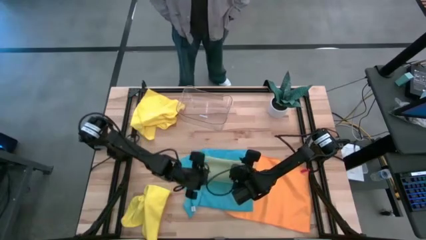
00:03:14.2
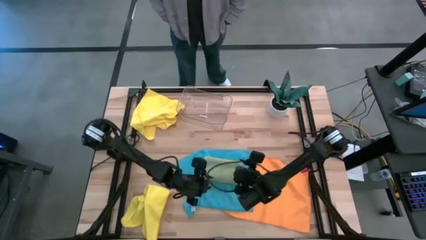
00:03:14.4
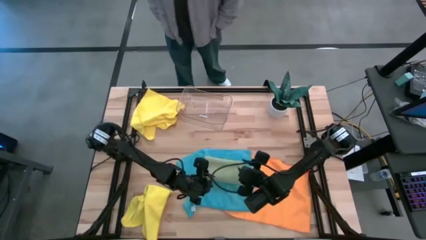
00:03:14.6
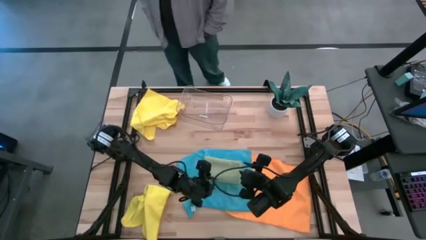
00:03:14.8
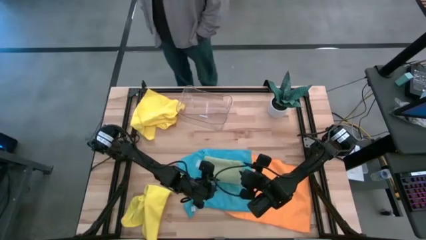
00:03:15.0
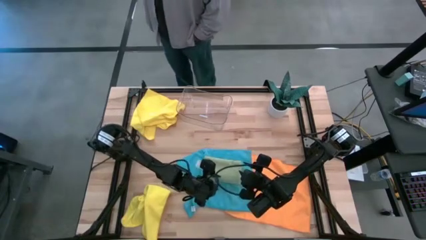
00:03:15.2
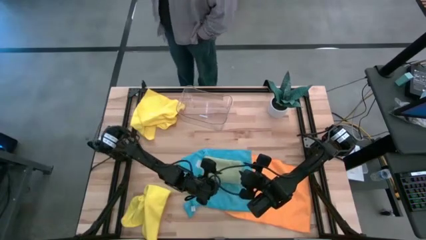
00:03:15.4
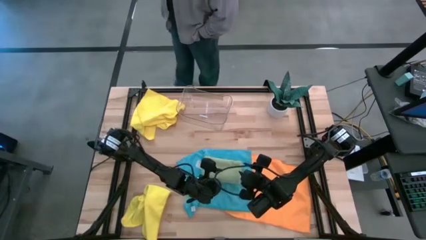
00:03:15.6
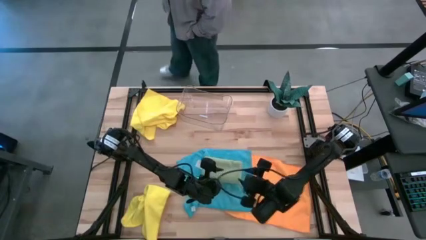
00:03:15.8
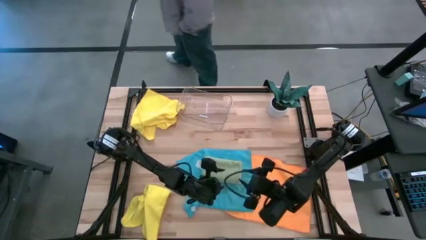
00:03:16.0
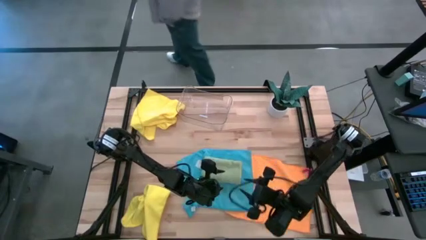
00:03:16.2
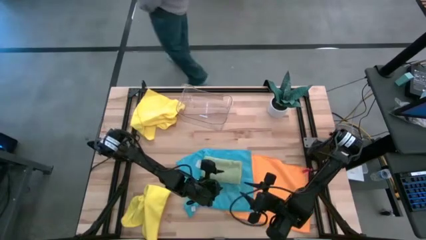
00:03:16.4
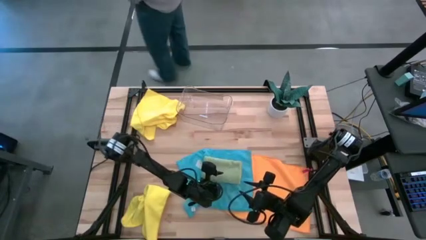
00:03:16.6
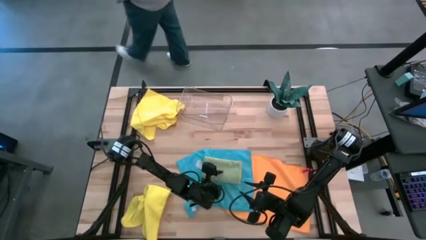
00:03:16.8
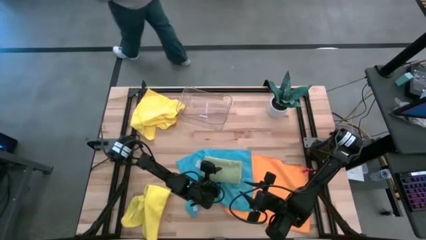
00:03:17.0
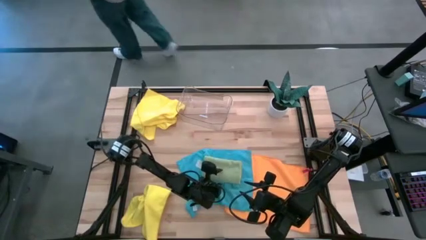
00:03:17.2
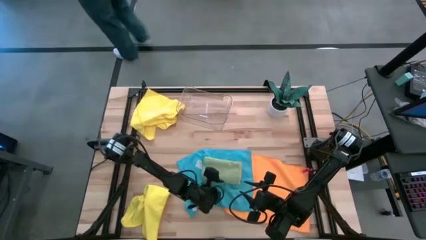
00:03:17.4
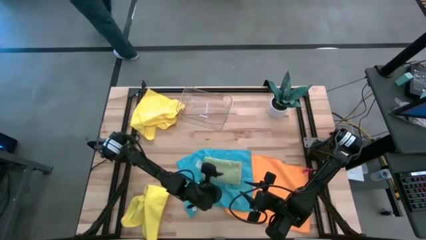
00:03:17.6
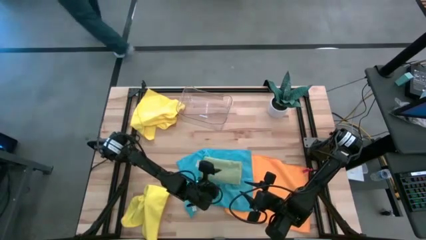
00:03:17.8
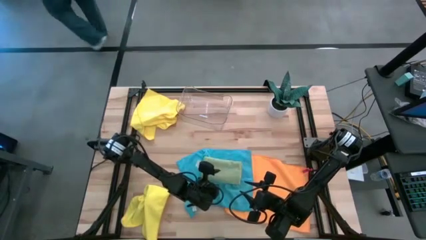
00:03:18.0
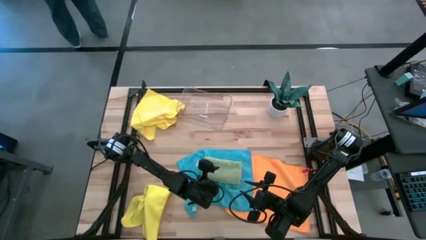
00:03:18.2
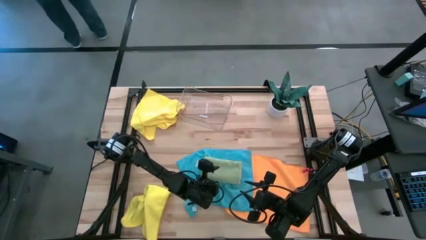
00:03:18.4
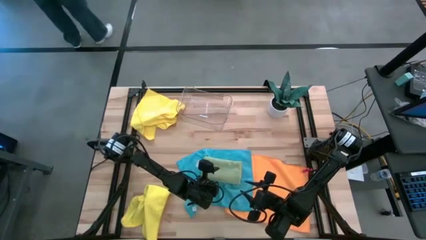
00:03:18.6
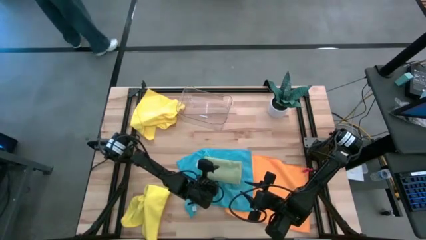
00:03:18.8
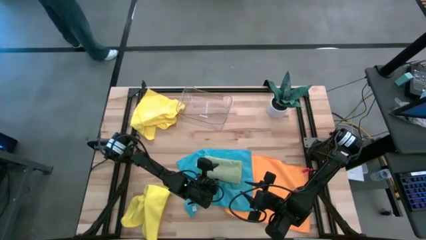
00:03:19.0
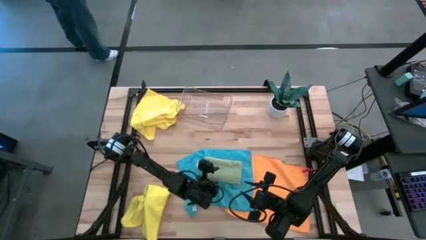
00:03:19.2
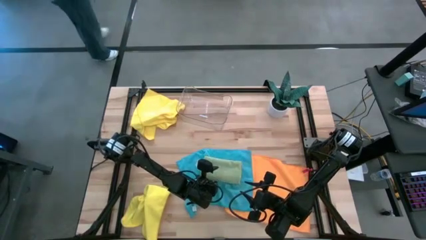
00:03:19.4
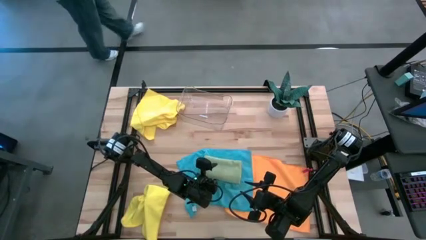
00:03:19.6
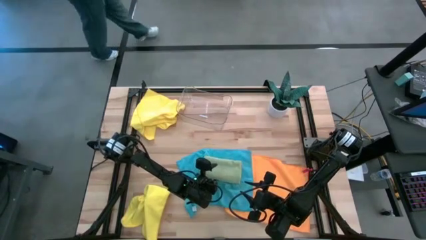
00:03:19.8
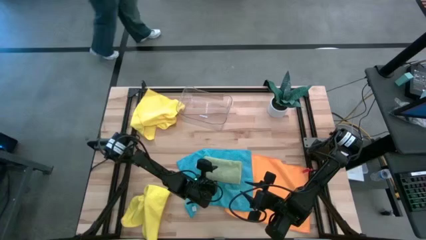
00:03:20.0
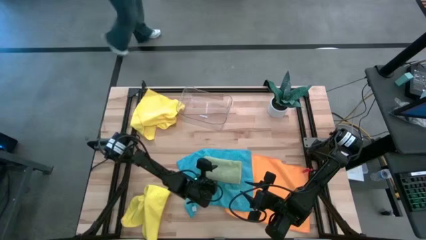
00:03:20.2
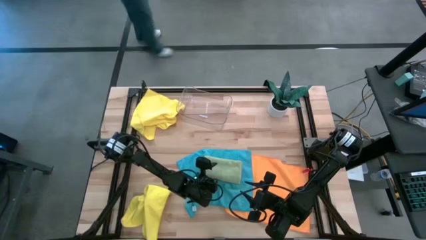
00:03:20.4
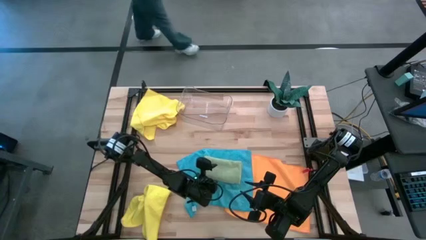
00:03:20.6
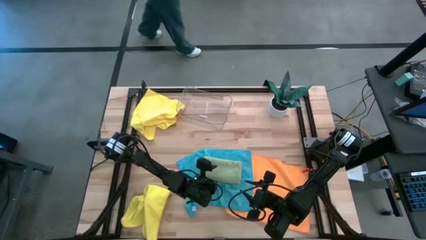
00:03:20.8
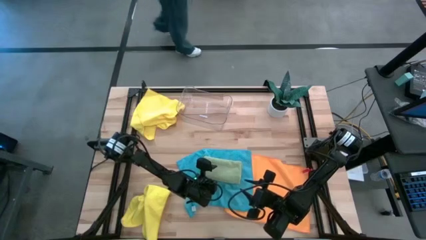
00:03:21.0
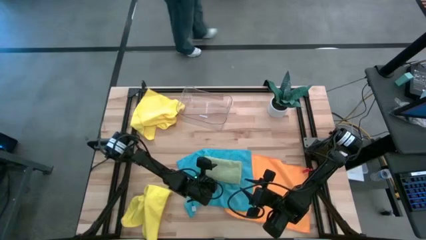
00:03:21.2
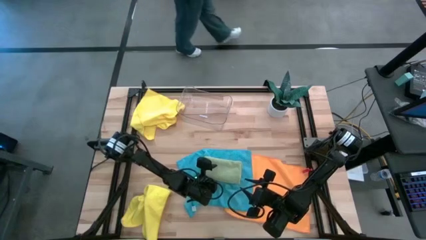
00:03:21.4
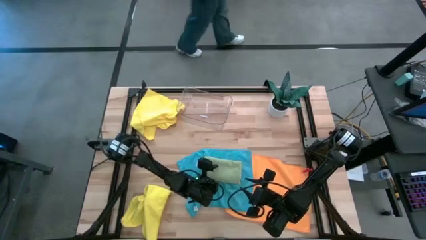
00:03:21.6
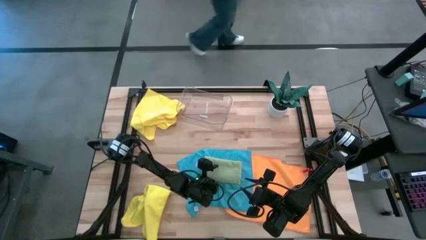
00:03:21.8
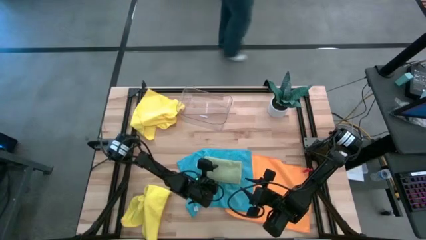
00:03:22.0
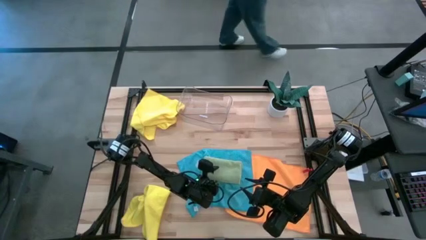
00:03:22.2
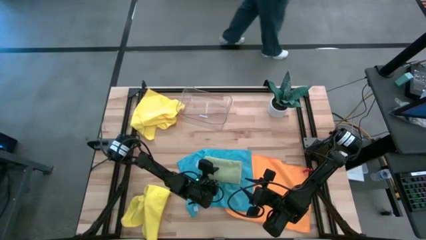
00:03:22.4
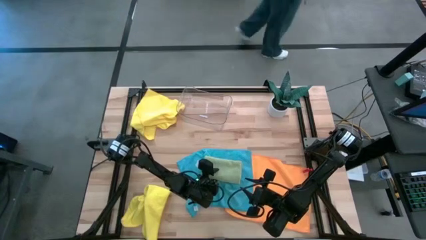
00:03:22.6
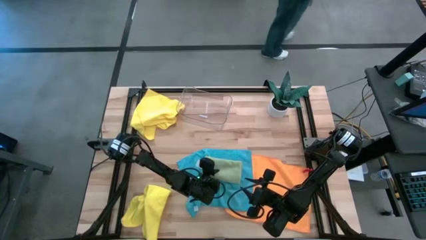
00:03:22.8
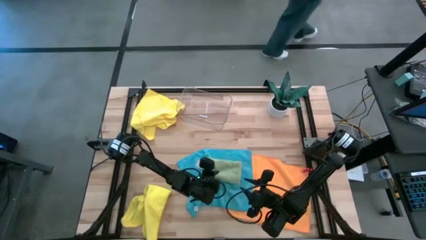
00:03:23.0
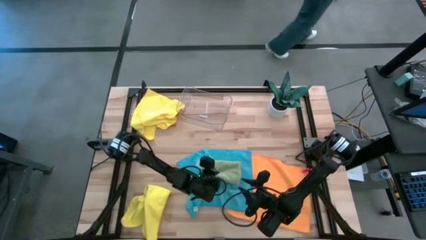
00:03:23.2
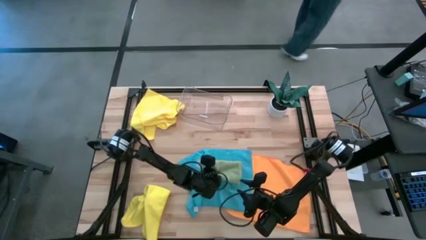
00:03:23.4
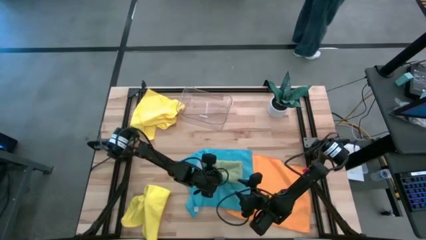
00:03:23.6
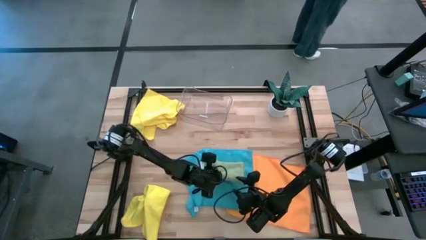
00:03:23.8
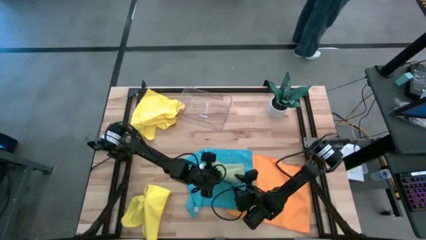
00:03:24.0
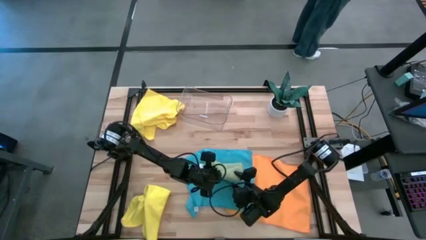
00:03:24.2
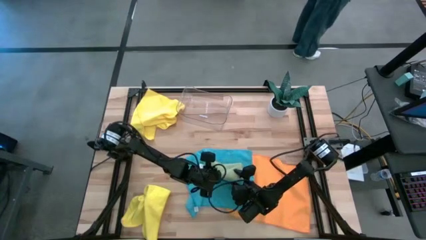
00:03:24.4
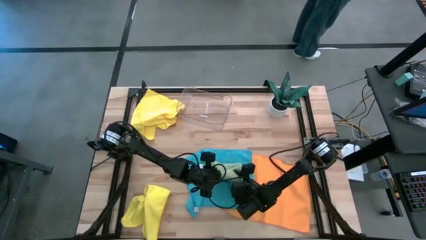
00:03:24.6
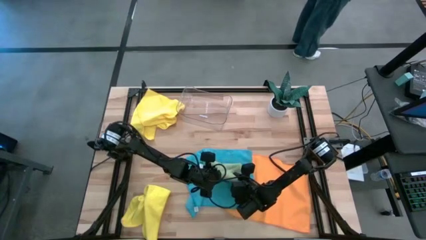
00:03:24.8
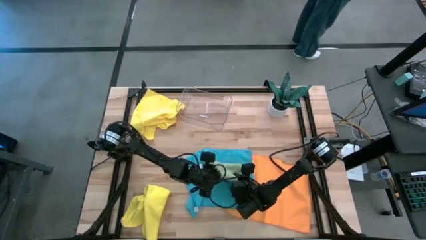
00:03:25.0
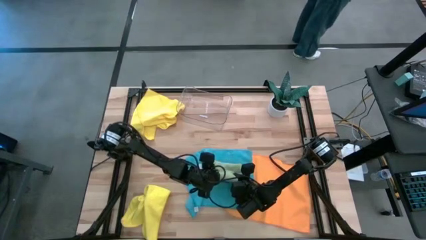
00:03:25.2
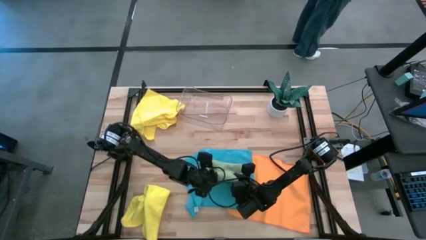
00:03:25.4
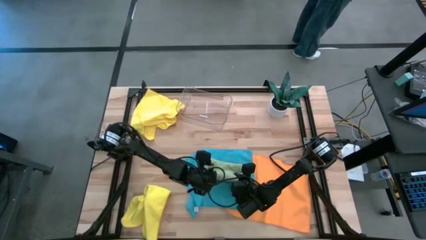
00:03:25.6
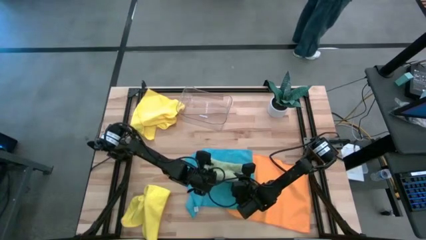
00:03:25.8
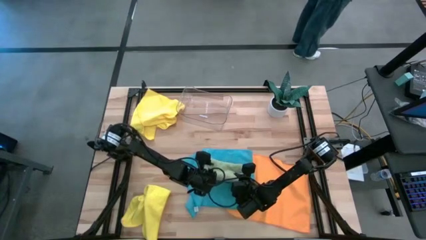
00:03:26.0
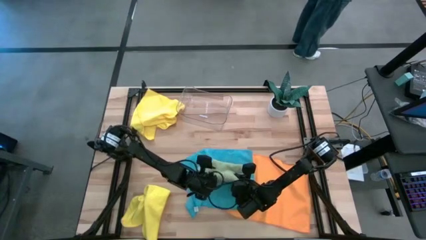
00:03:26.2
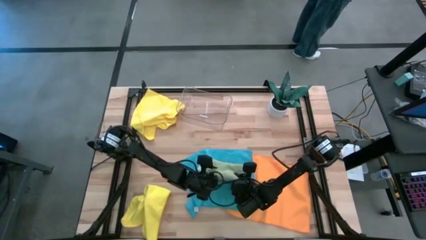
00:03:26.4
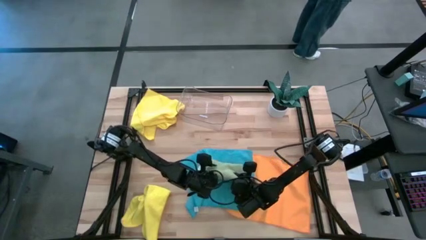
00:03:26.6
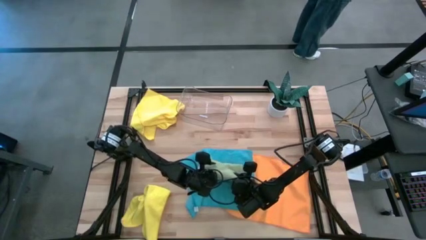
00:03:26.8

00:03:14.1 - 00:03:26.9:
Task: Fold microfiber towels
Put the green folded towel into the transparent bin

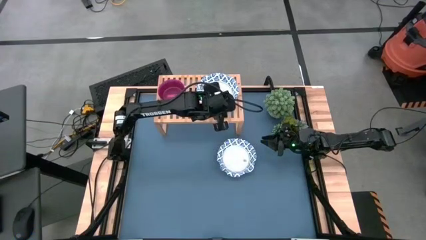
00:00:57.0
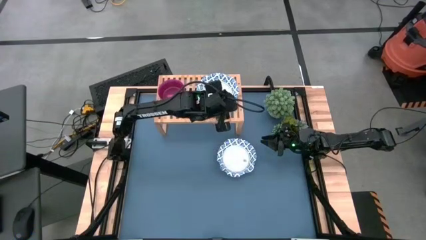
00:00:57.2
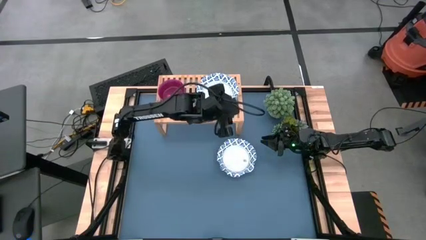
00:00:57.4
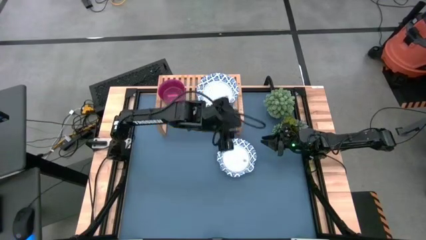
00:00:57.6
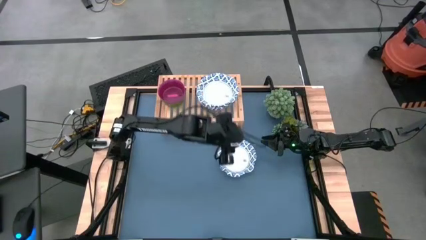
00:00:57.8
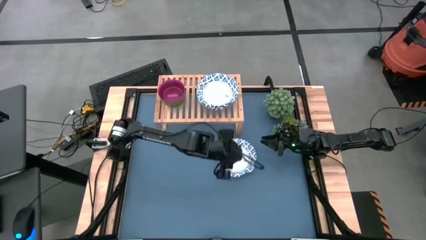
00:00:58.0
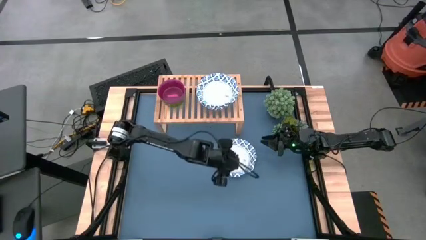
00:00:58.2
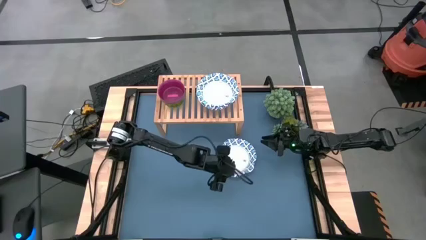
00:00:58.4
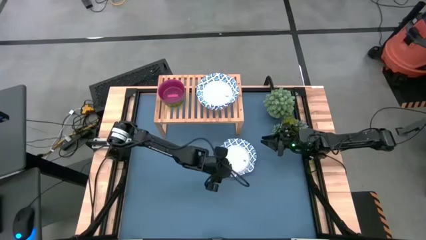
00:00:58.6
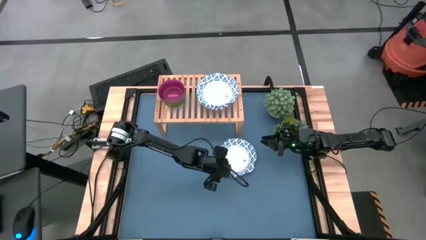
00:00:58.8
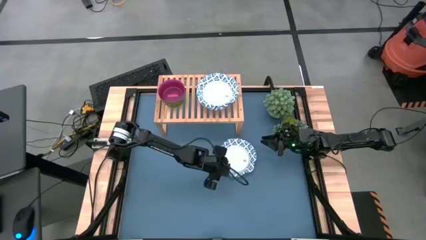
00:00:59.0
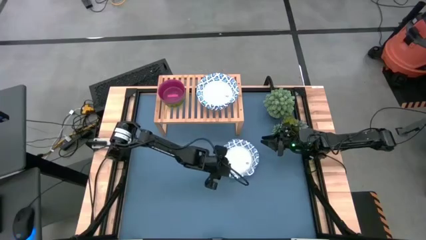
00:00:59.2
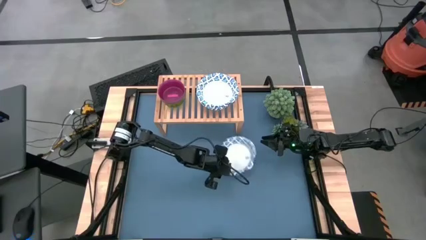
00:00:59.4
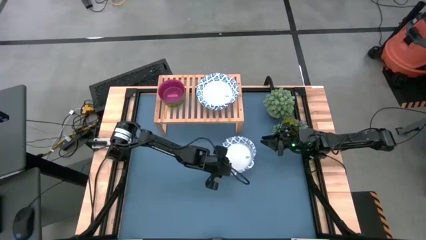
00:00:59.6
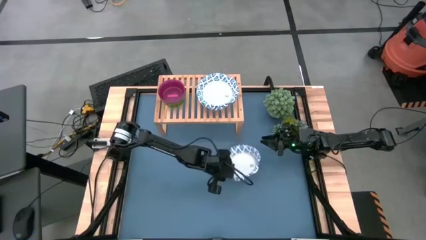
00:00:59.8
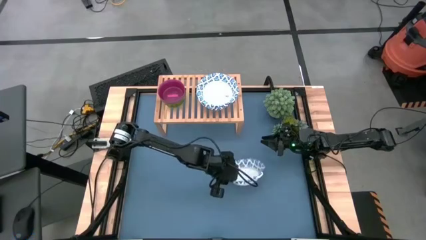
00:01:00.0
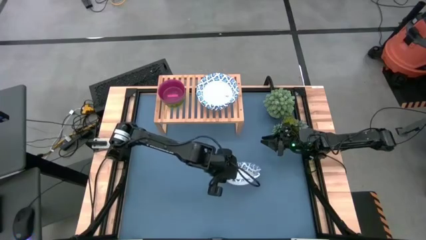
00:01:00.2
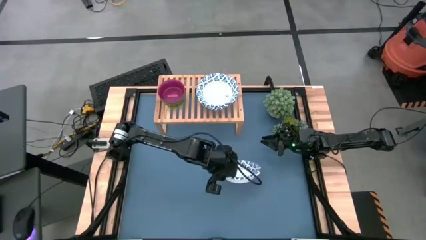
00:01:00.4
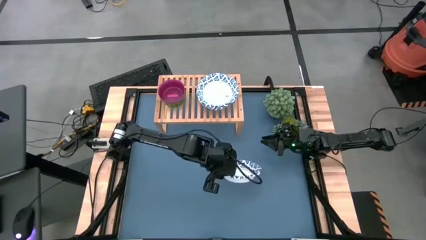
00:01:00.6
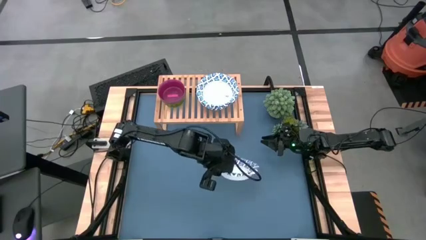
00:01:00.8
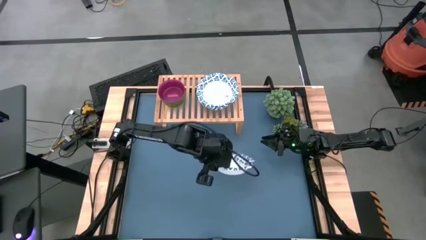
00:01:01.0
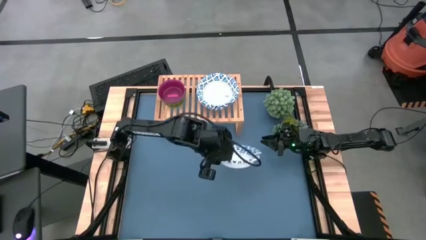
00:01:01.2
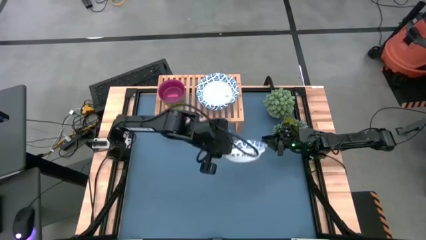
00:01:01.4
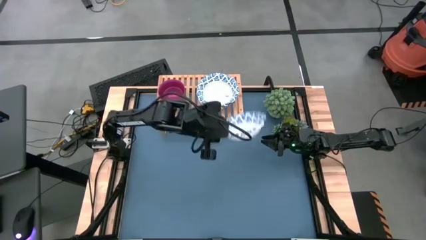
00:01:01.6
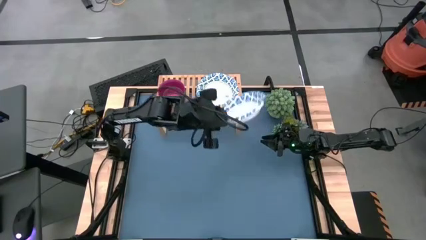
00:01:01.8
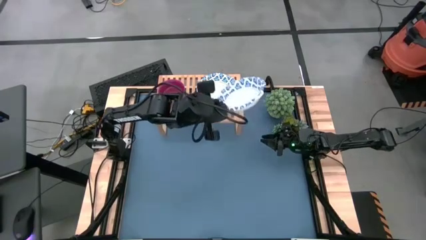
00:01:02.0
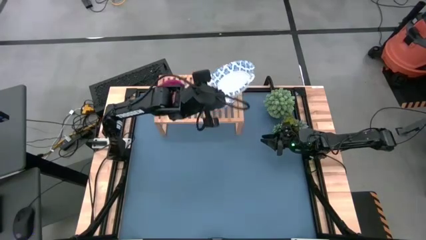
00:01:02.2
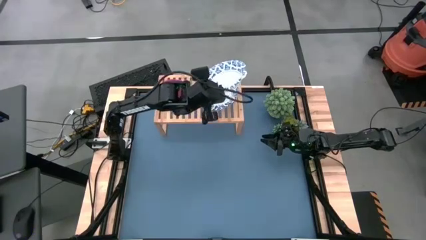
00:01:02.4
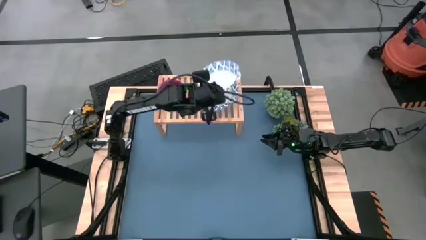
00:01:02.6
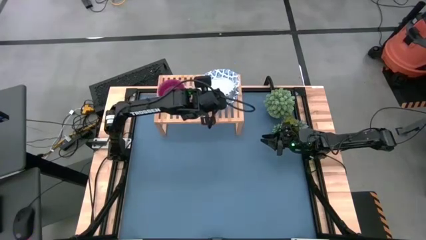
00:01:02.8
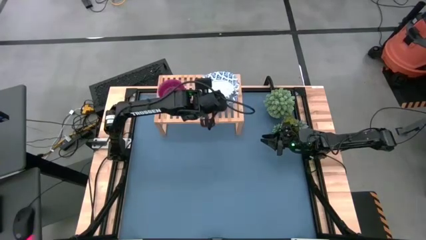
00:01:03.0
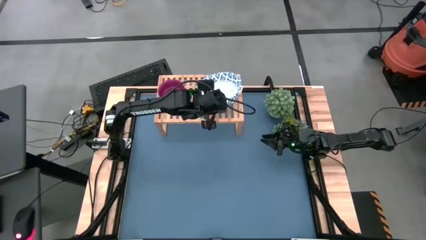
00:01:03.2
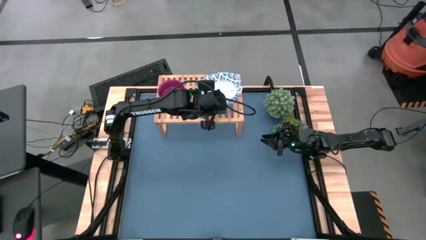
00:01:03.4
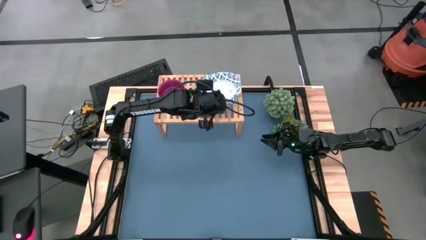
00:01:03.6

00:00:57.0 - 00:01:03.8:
Task: Place and stack bowls onto a shelf
Stack the blue patterned bowl on top of the other blue patterned bowl on the shelf
